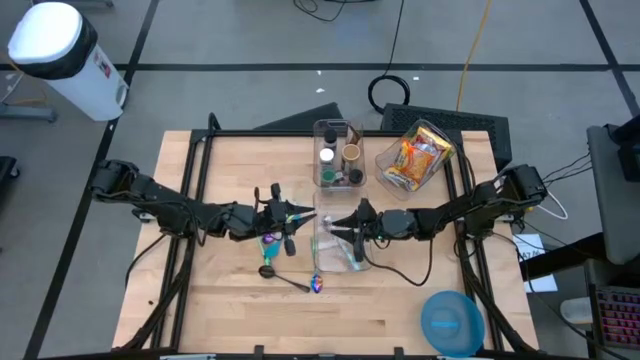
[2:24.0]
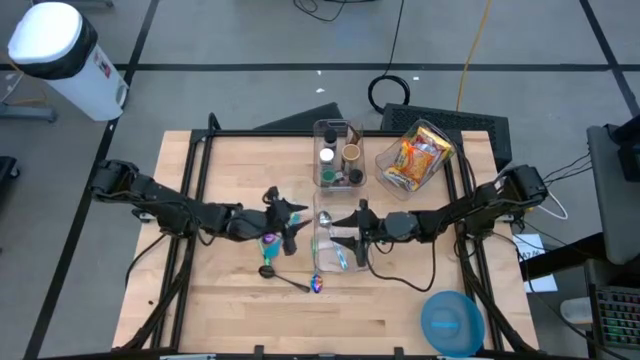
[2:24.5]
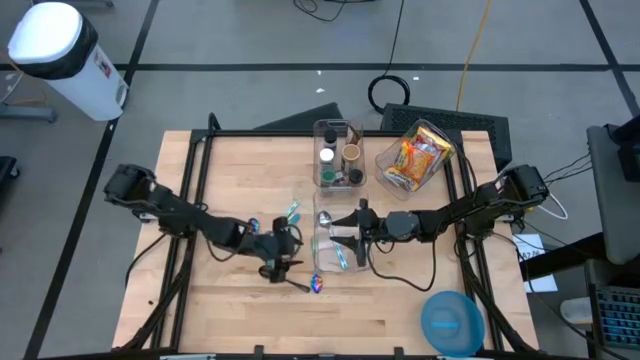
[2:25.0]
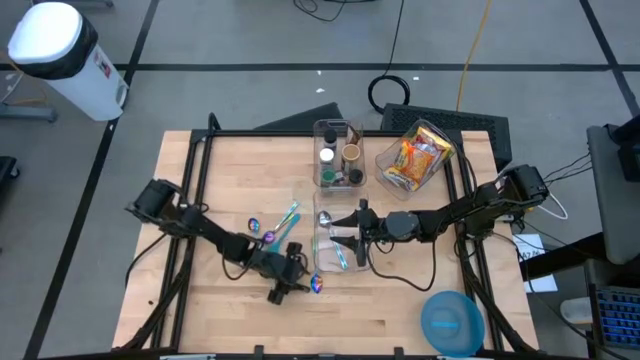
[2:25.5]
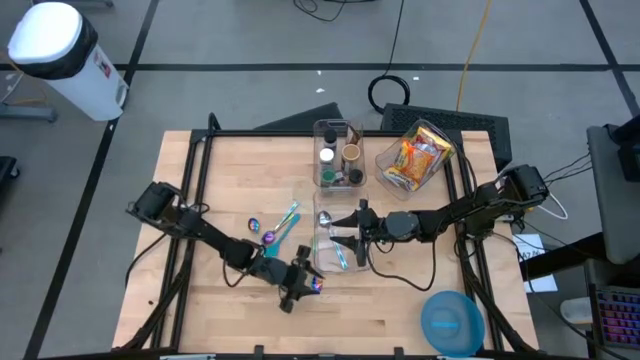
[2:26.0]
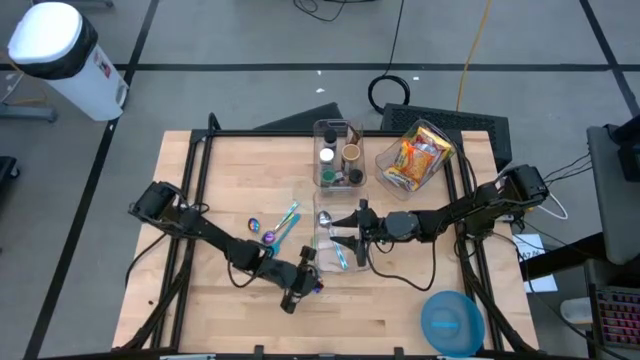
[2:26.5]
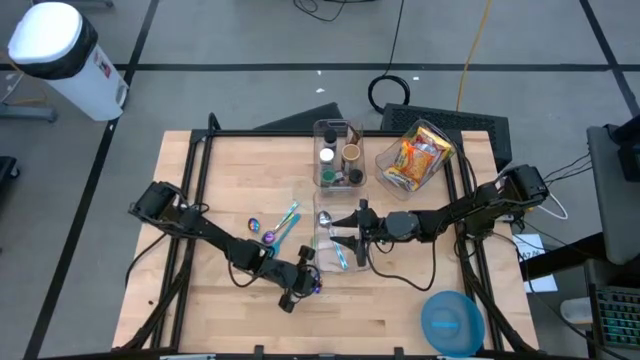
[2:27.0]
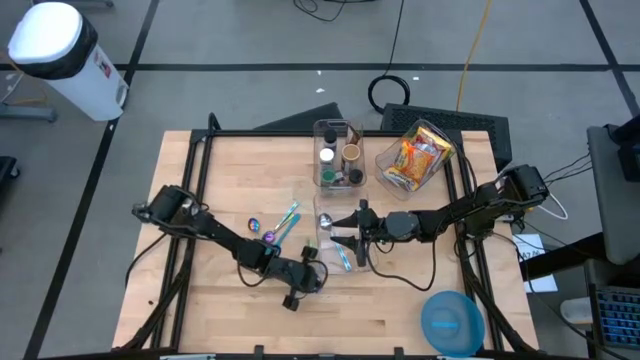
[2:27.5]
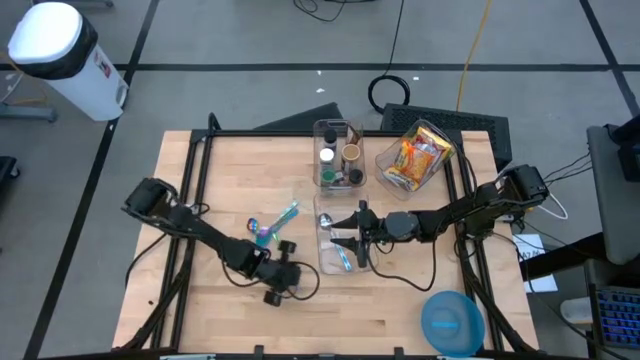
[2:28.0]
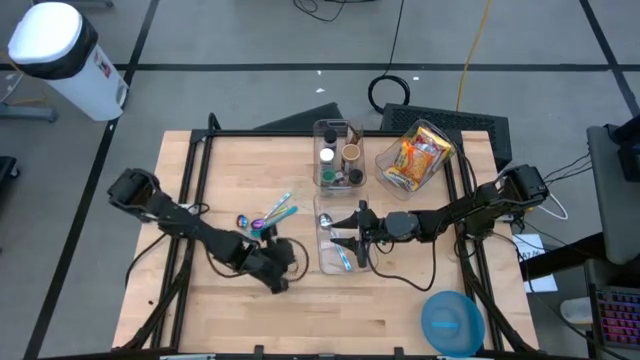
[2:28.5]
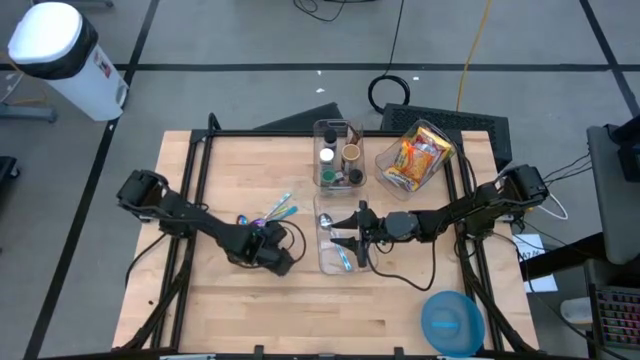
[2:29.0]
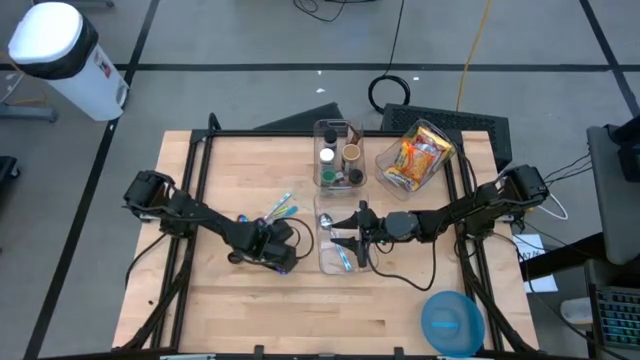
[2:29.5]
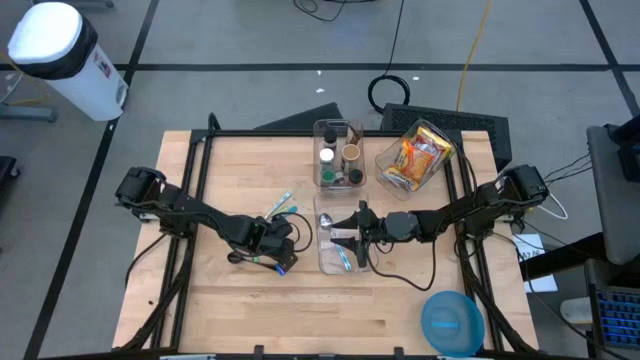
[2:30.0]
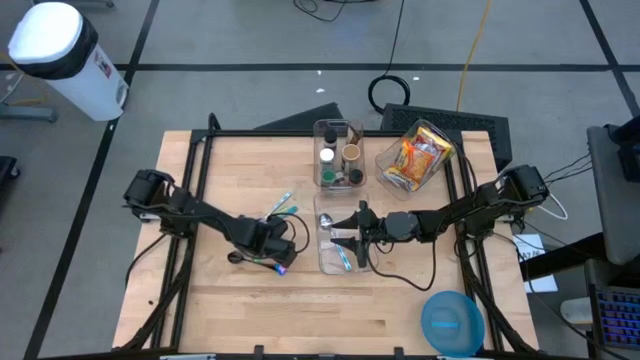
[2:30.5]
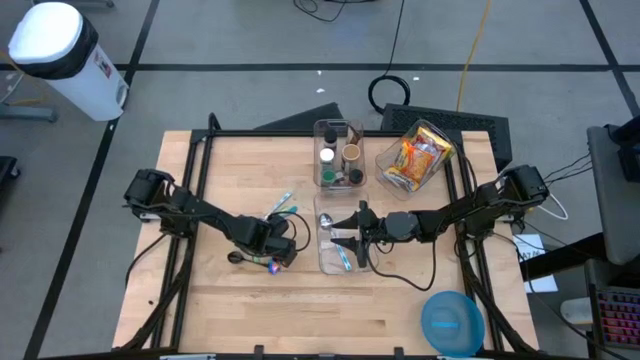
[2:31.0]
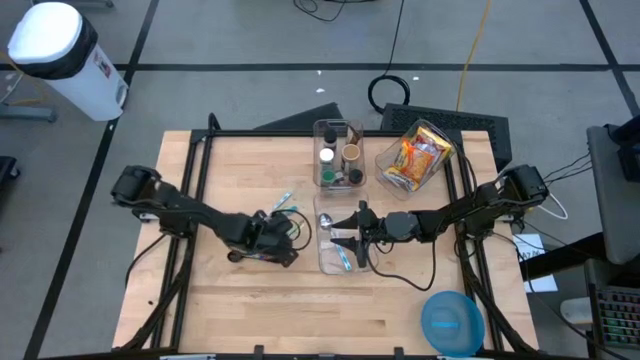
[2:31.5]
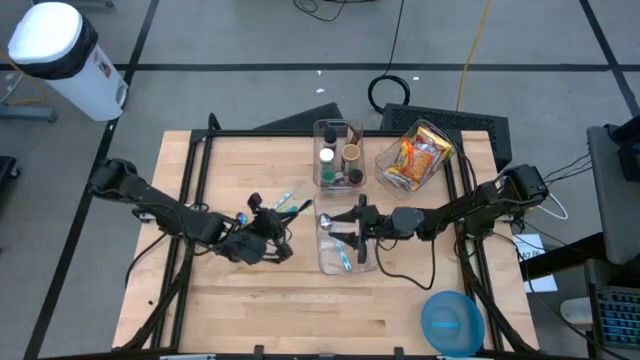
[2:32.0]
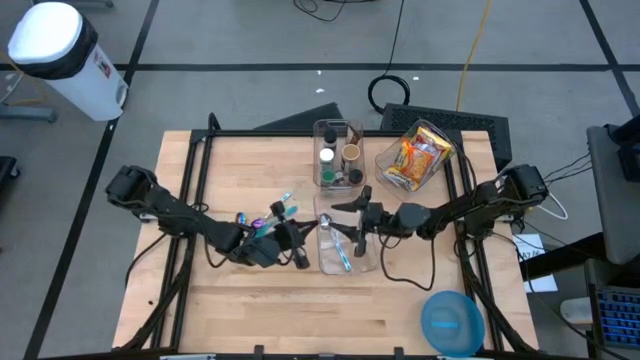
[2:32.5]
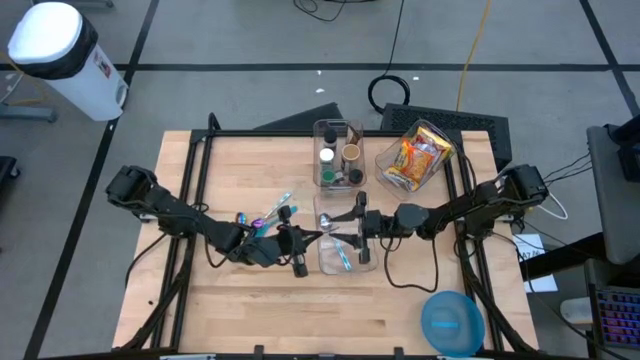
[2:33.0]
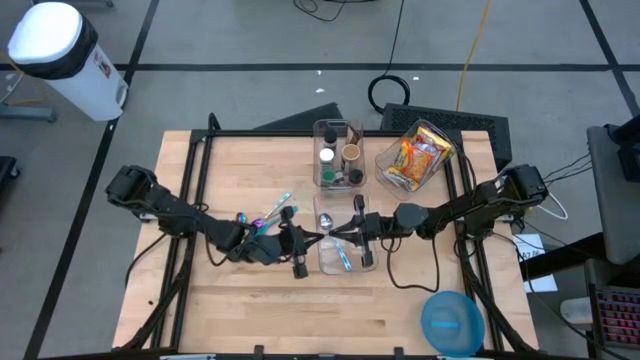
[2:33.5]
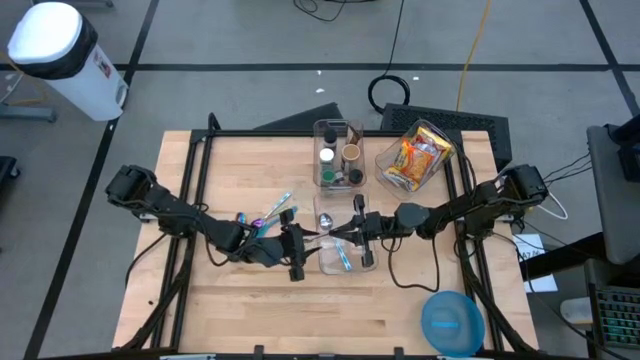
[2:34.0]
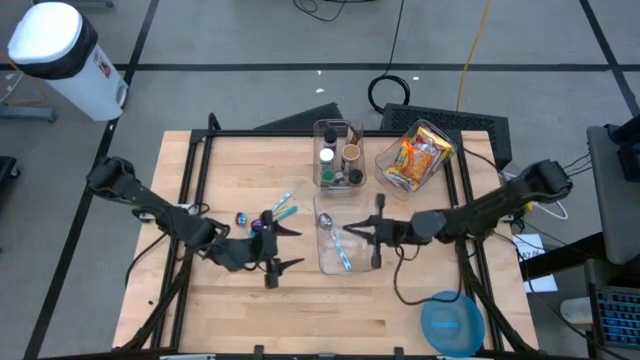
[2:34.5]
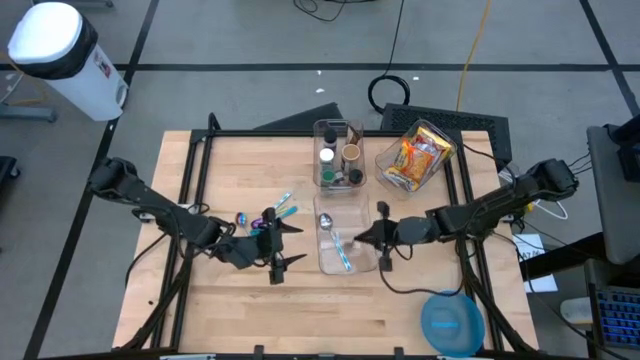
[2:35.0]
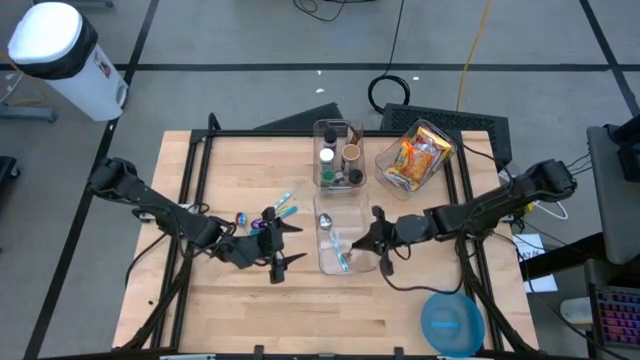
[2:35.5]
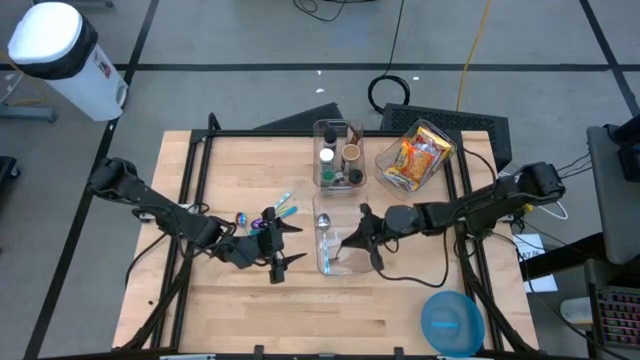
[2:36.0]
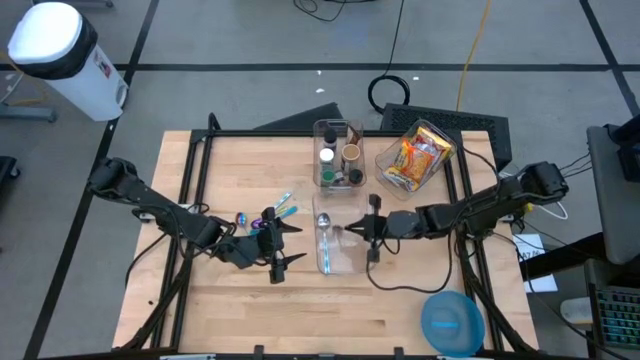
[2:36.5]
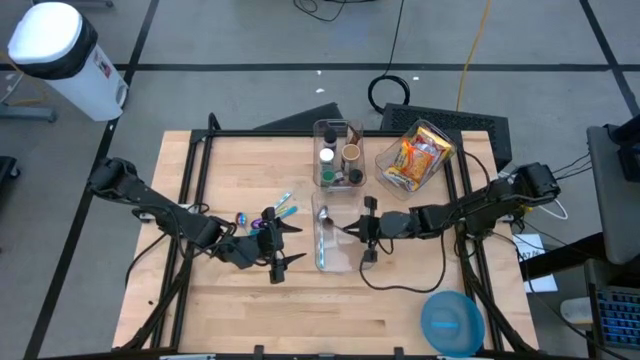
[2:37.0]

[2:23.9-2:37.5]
Task: Pick & Place Food Item
Put the bottom violet spoon into the bottom transparent bin

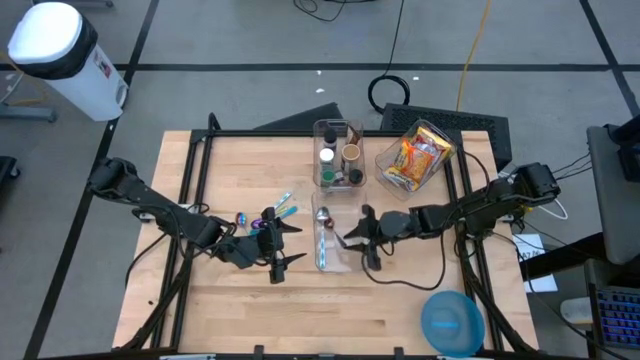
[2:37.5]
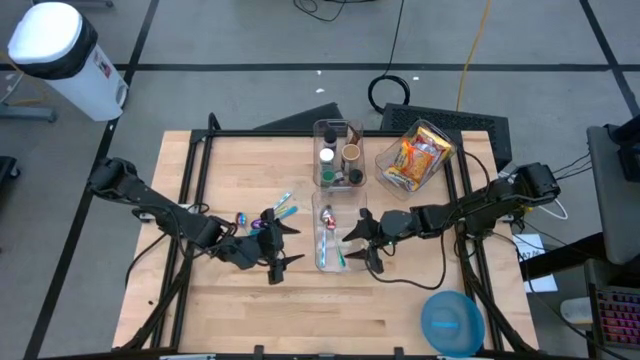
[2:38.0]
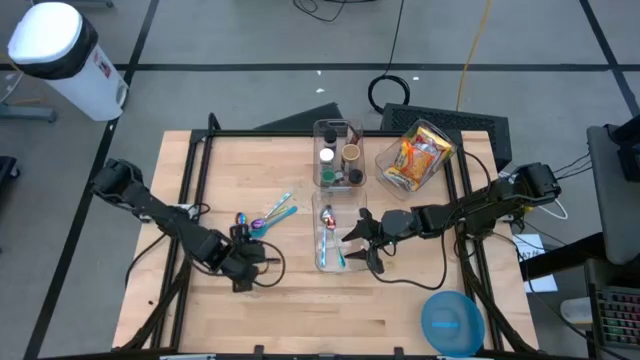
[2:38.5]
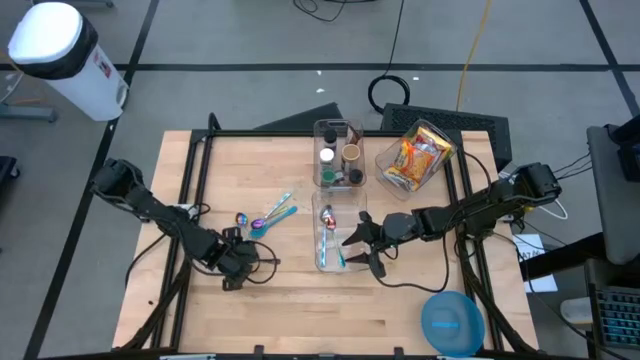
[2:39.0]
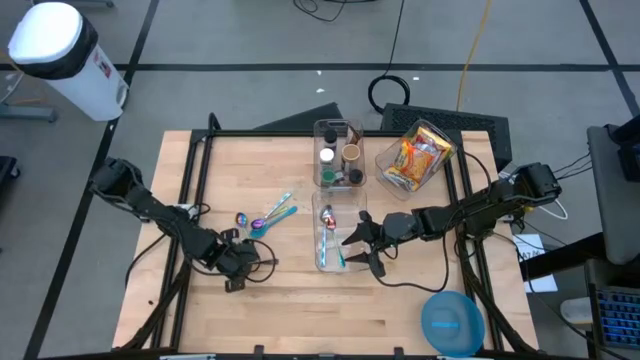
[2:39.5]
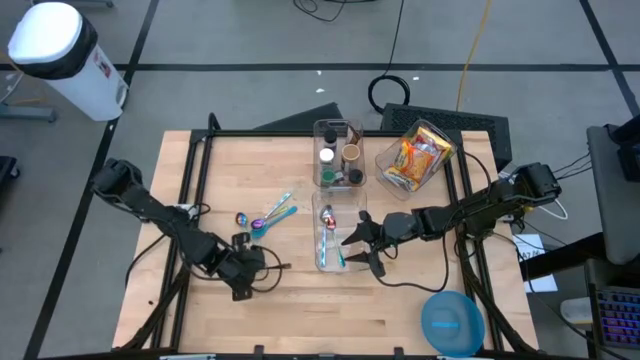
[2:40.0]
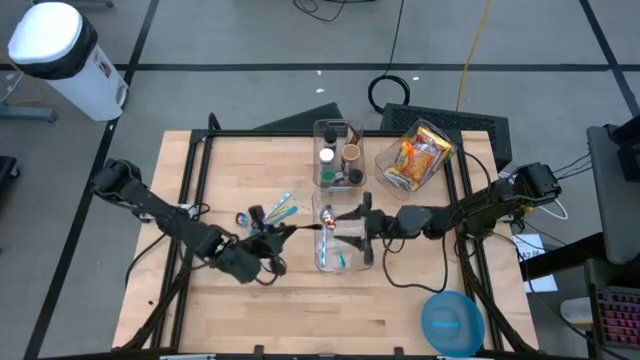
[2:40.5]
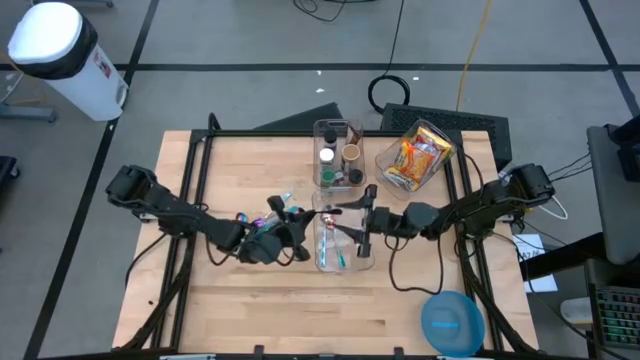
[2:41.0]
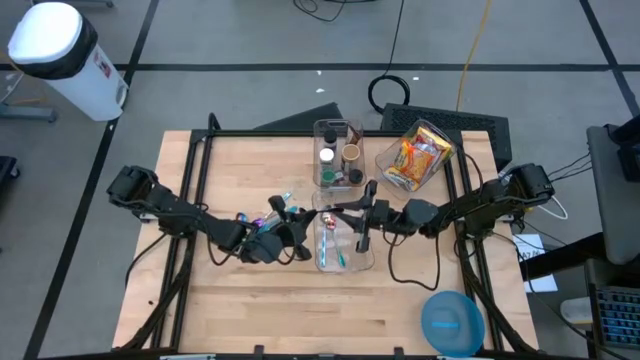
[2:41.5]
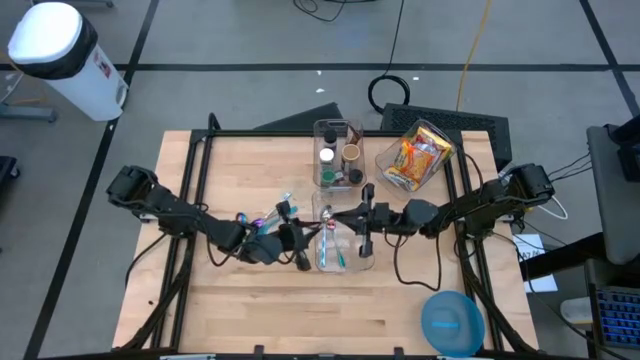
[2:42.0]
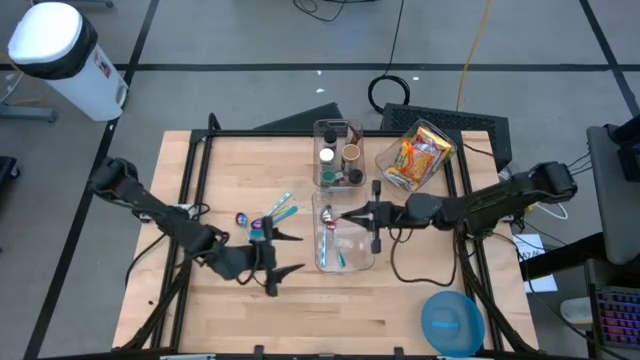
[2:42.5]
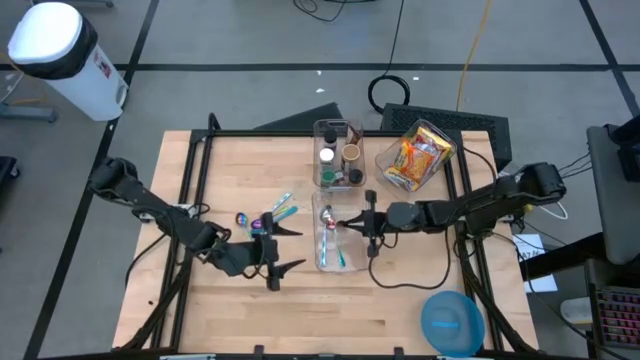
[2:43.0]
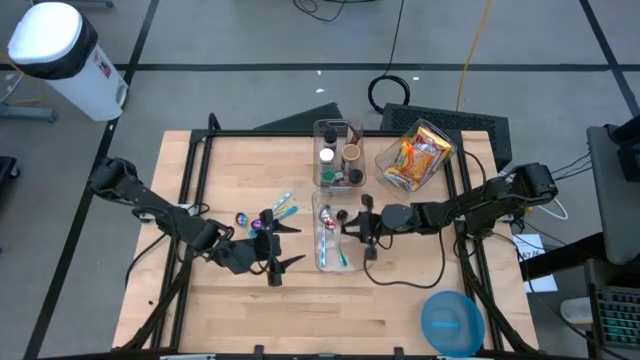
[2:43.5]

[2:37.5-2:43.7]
Put the black spoon into the bottom transparent bin
